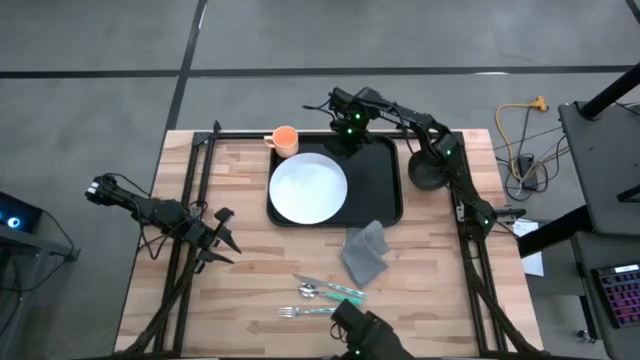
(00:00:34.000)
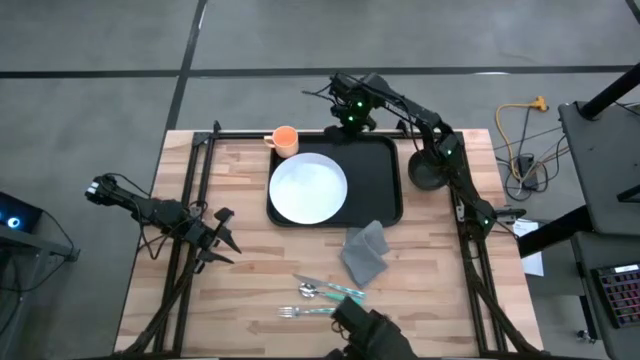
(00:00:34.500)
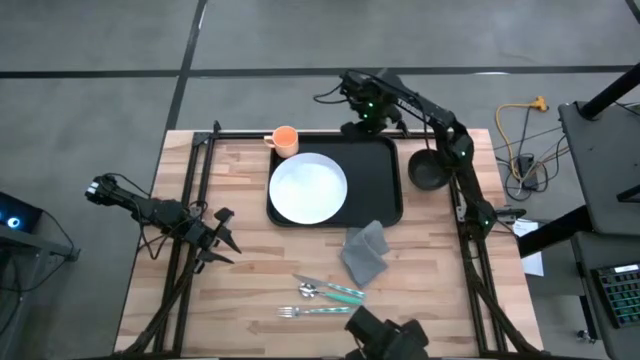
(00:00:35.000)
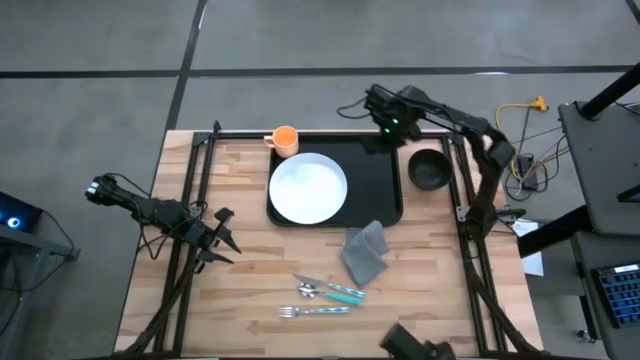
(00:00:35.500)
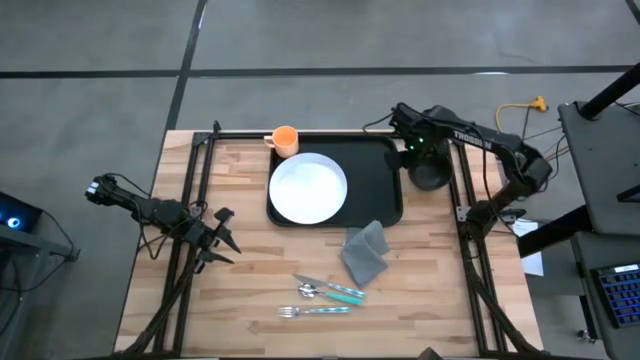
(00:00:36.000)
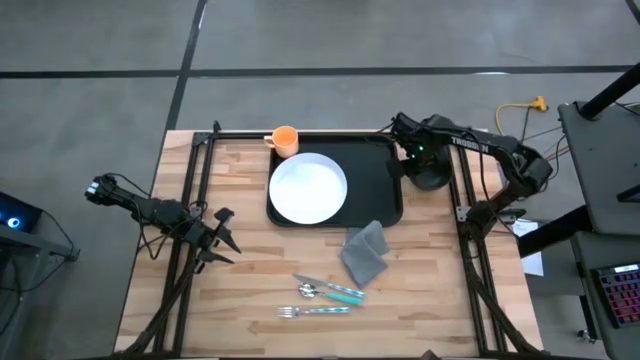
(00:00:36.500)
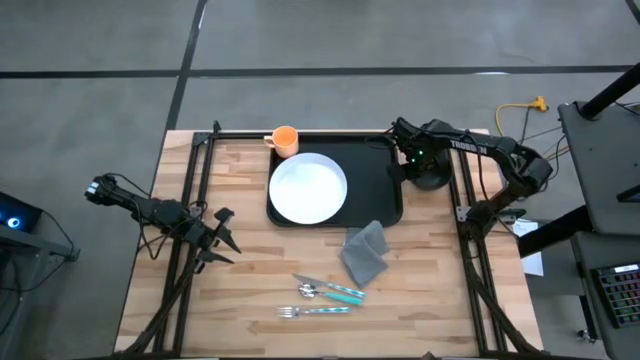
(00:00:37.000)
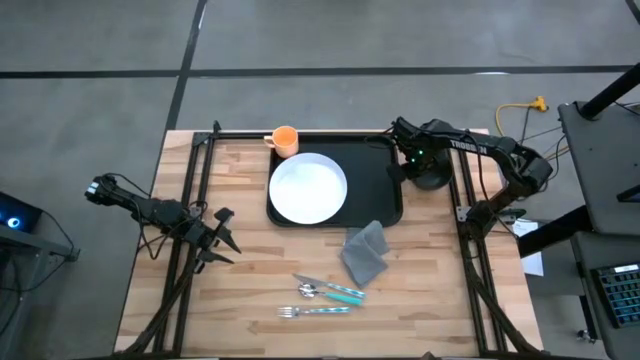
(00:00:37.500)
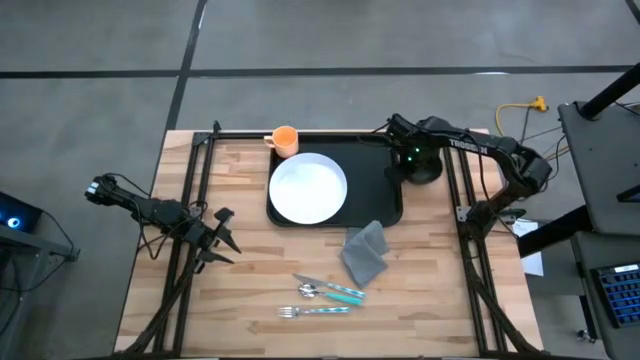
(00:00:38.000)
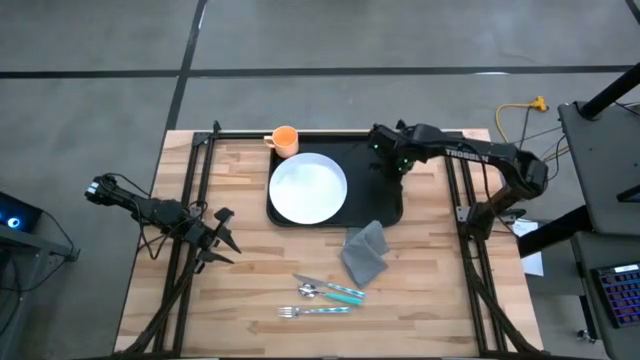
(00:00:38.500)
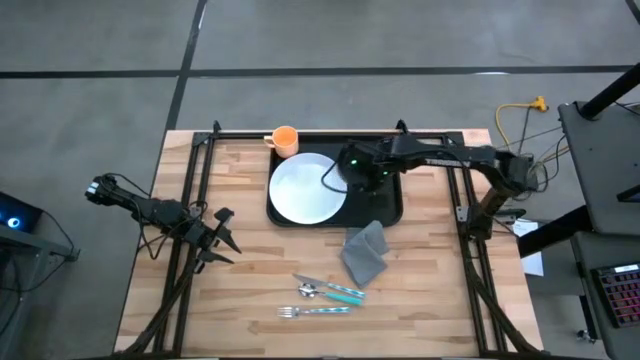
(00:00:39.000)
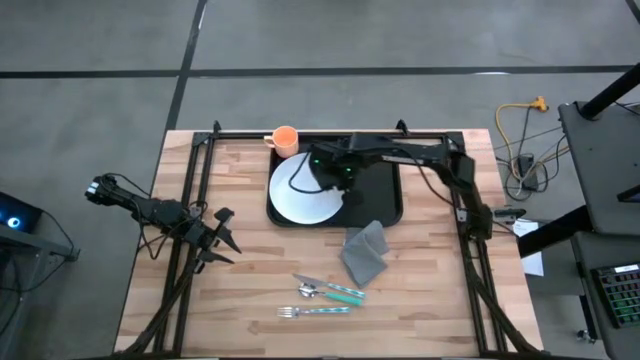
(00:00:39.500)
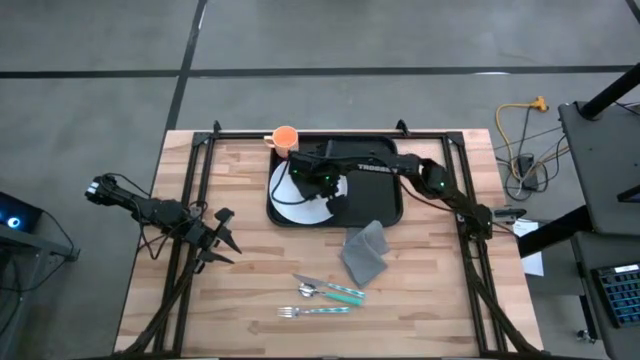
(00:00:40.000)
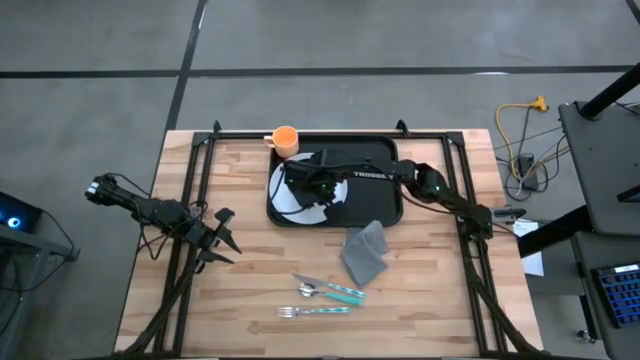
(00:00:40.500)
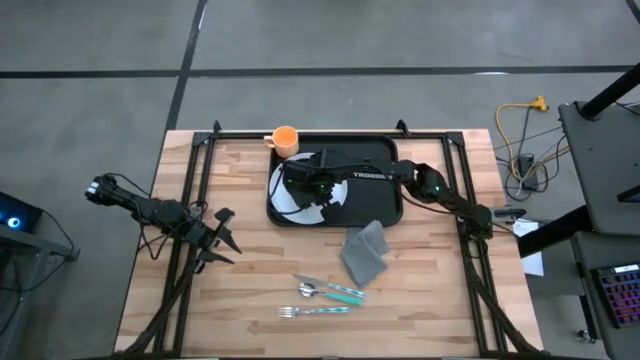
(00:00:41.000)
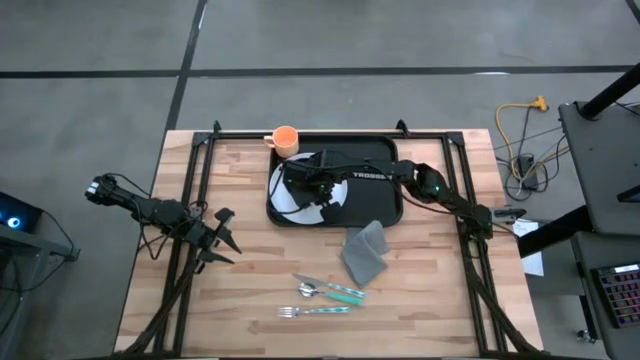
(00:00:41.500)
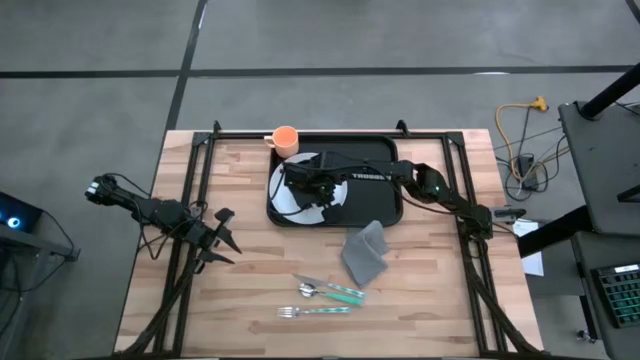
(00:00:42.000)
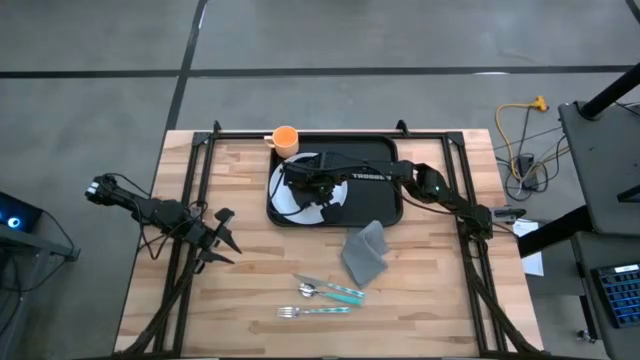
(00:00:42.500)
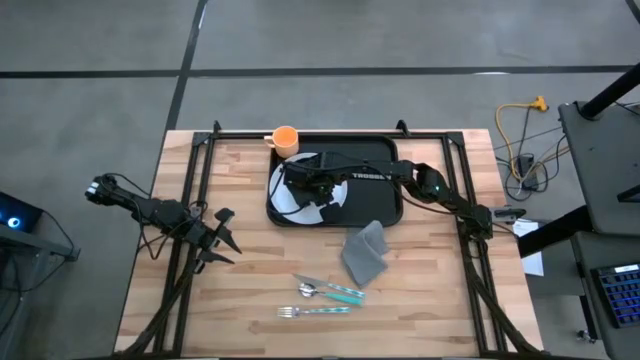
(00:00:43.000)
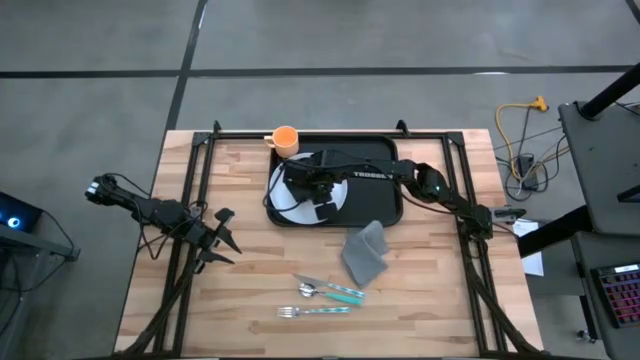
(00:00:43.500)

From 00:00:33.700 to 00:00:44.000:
Task: Set up tray
Put the black bowl on top of the white plate of the black tray

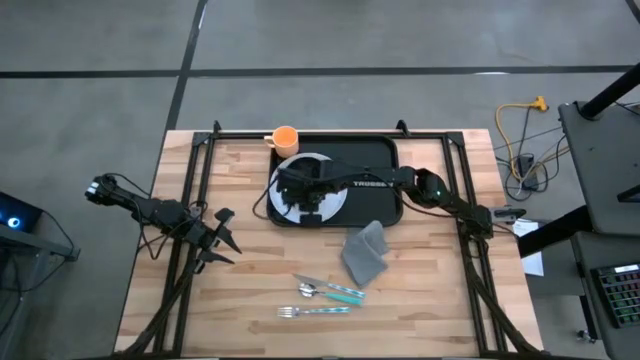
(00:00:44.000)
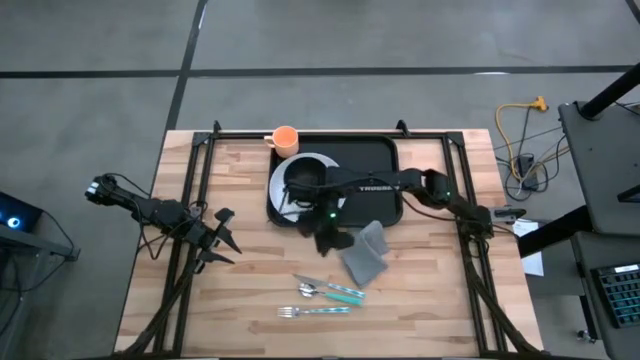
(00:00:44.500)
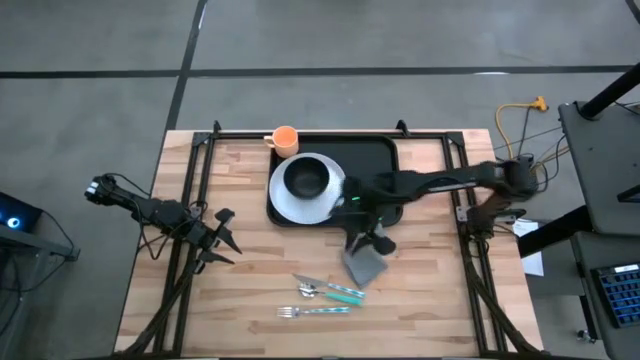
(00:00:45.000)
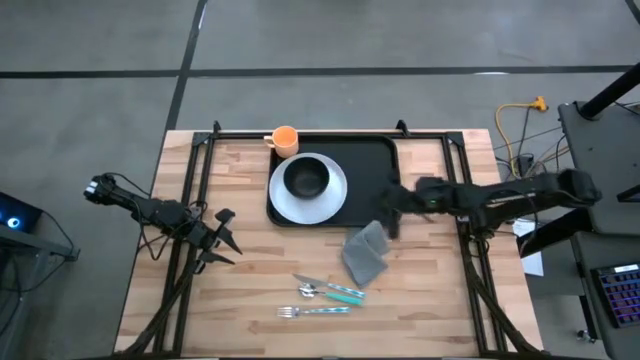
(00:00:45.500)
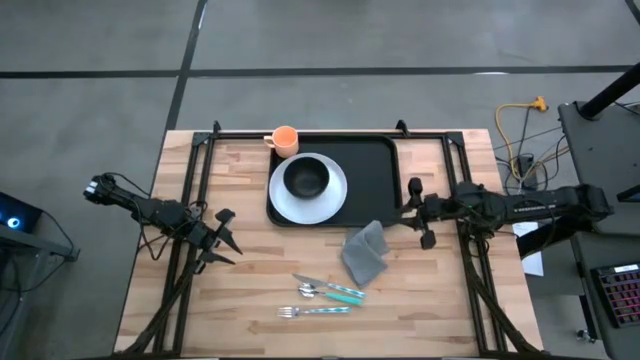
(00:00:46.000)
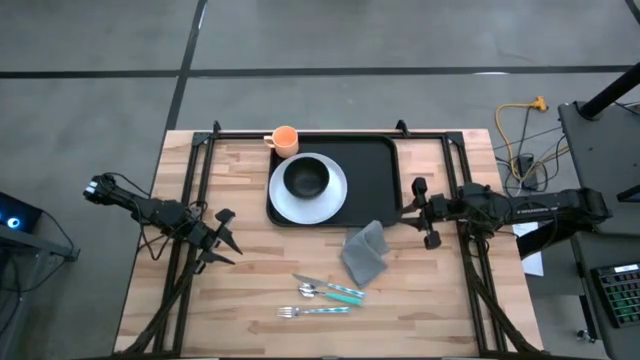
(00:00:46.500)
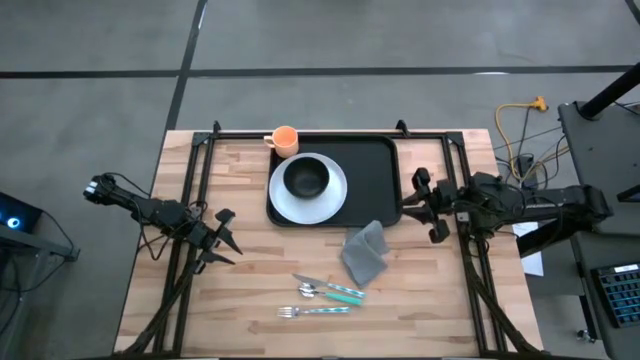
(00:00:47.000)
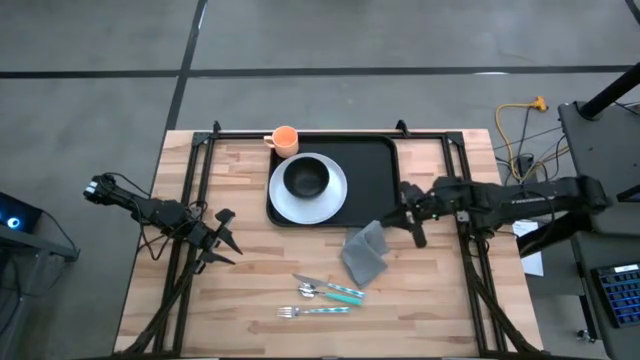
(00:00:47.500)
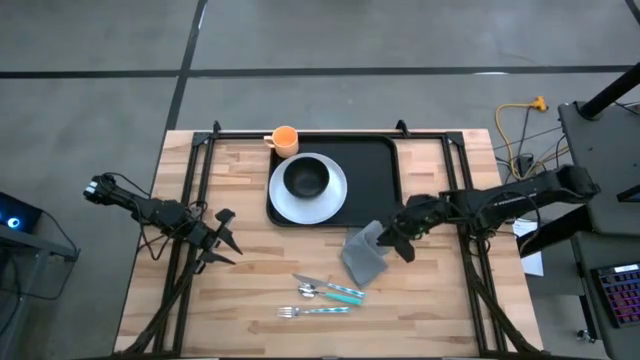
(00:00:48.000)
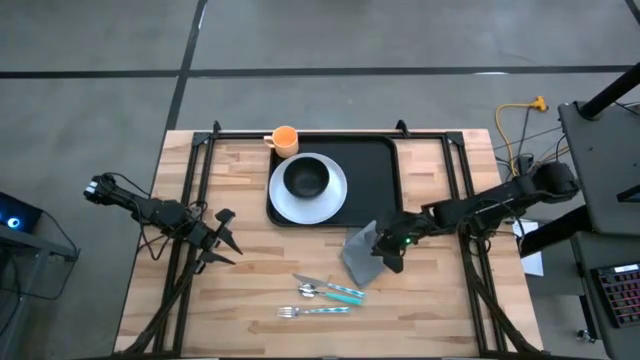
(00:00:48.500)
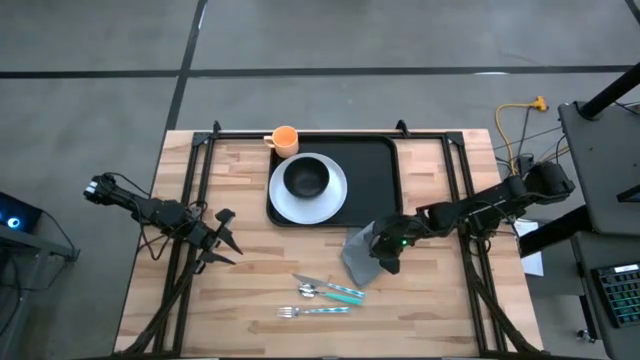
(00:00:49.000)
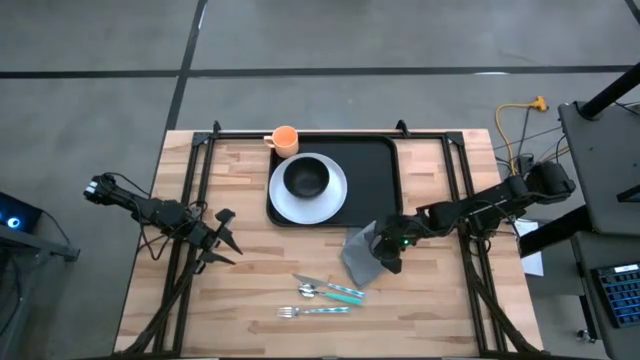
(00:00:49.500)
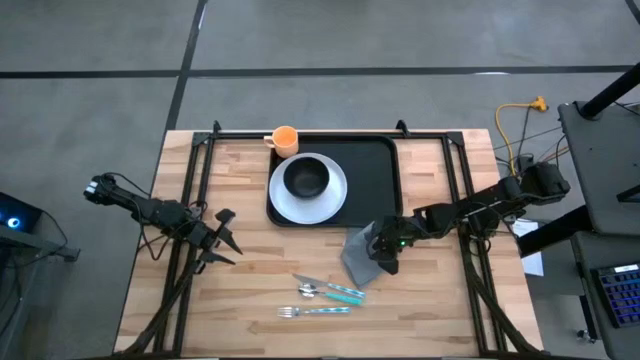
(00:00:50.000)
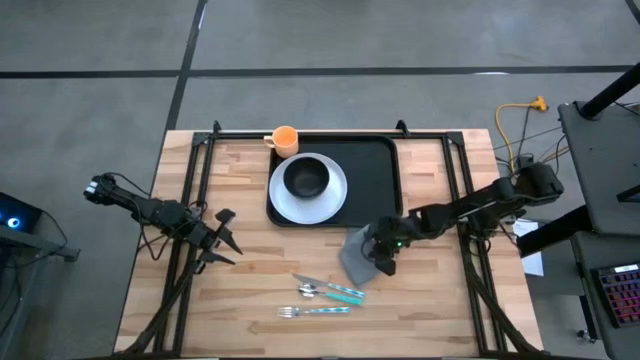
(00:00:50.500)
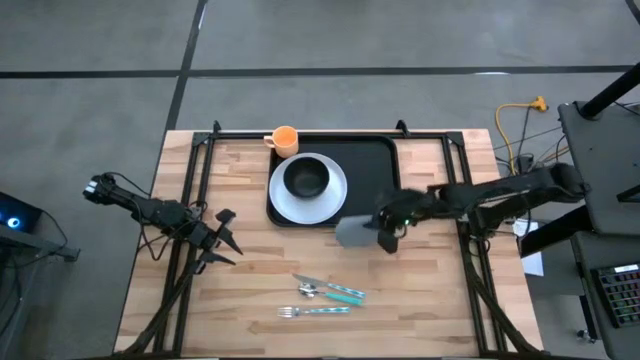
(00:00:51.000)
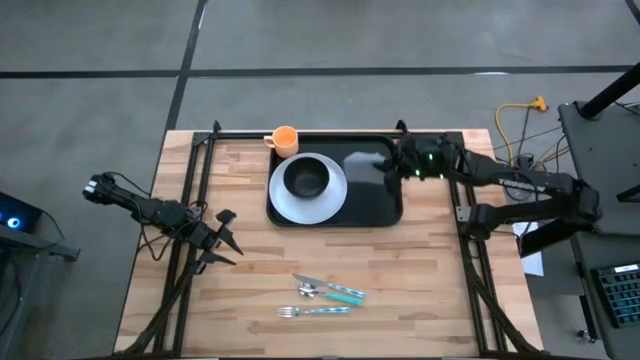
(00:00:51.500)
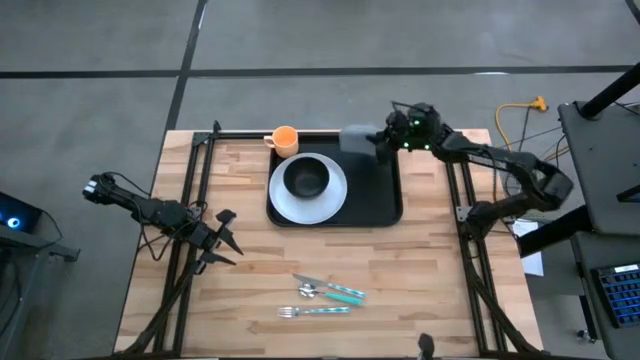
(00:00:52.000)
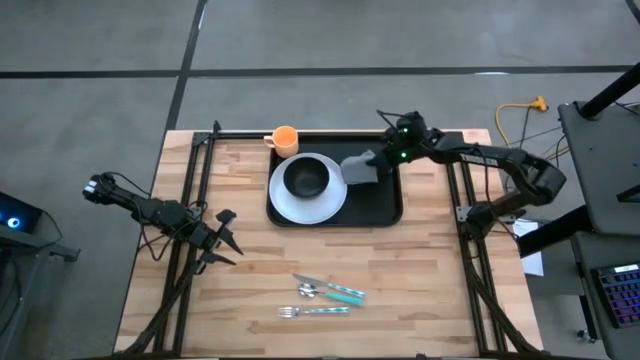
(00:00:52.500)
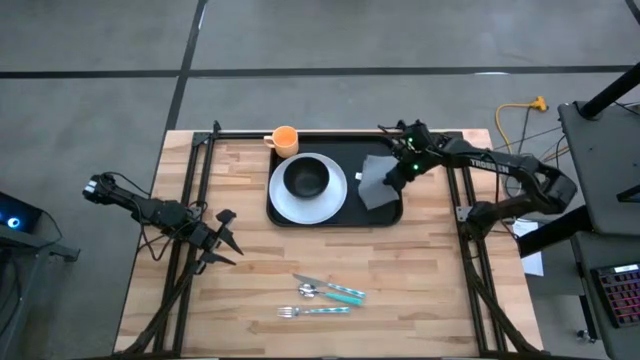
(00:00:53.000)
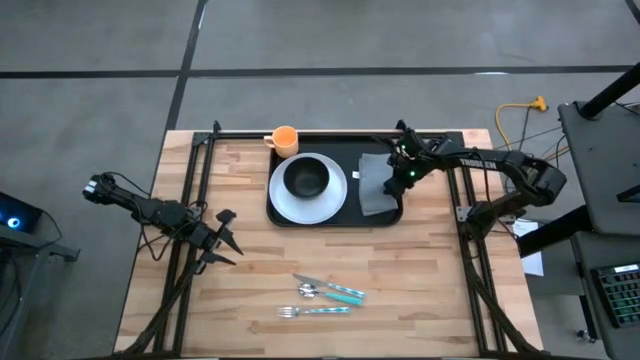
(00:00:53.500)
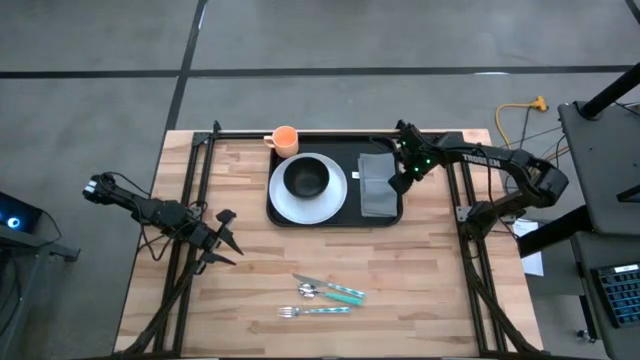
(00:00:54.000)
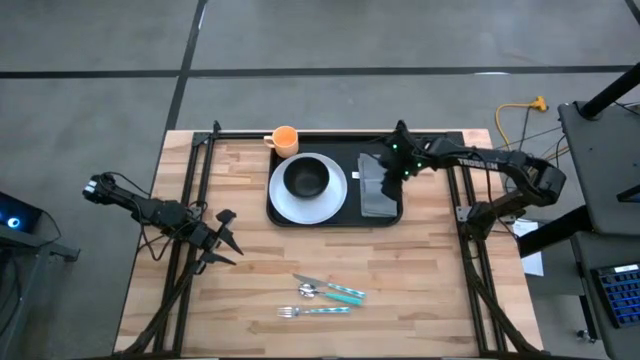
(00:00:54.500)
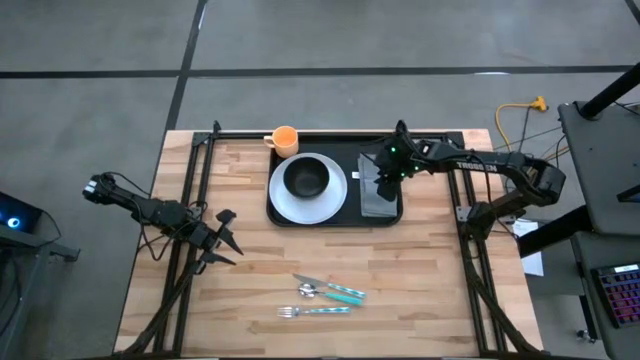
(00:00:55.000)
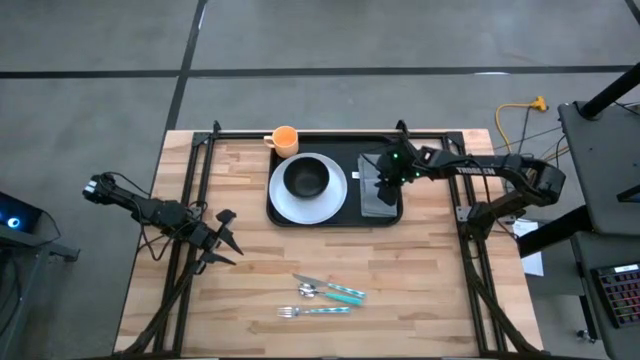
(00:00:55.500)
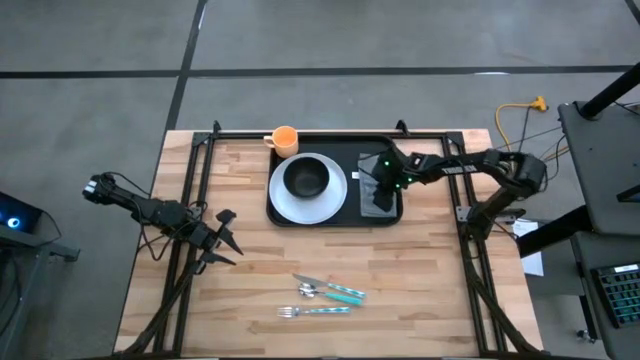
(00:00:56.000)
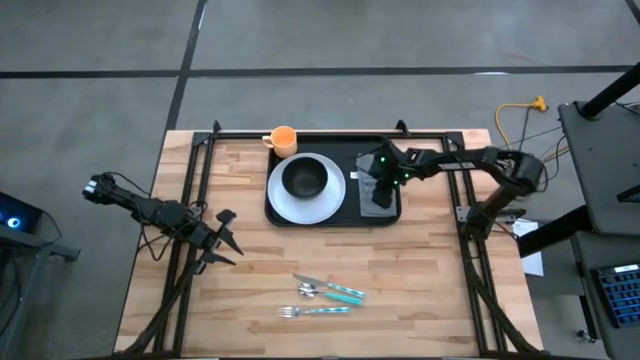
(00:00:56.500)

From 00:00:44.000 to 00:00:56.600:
Put the gray napkin on the right side of the black tray
